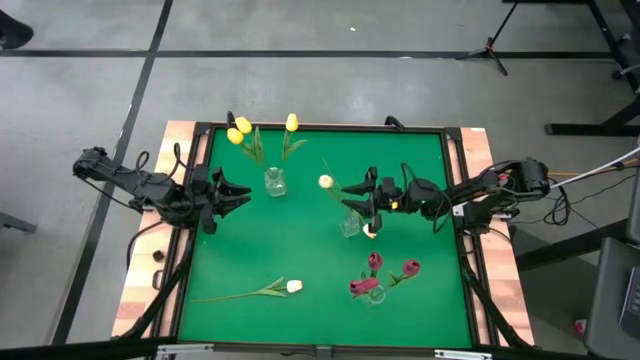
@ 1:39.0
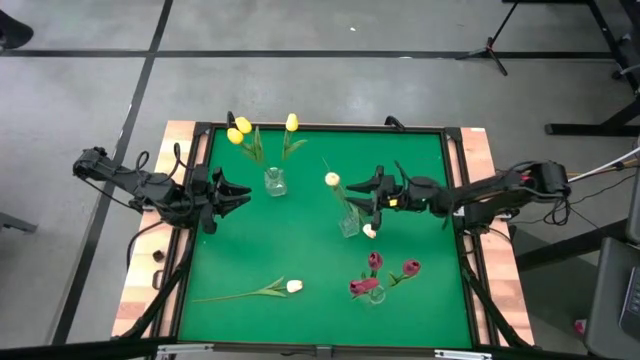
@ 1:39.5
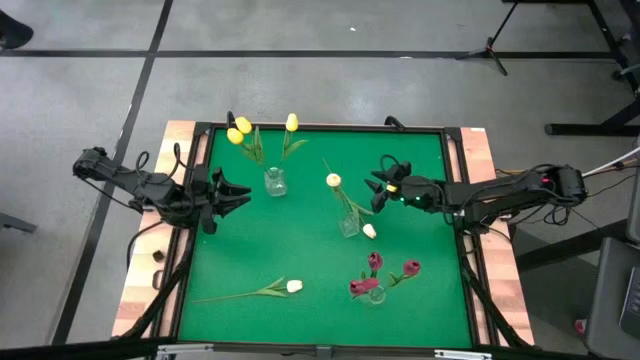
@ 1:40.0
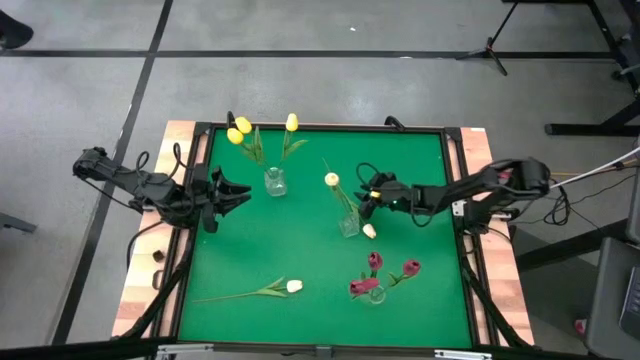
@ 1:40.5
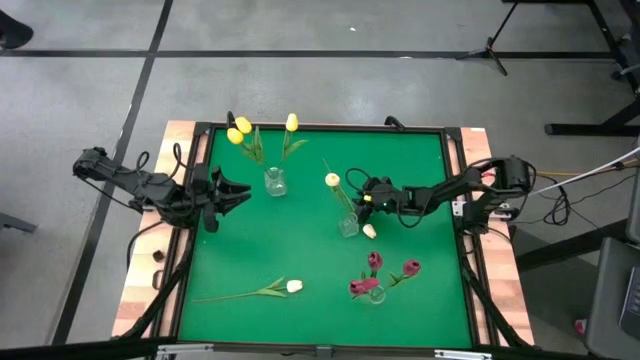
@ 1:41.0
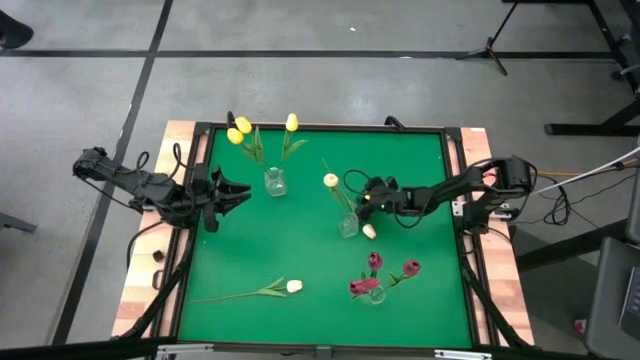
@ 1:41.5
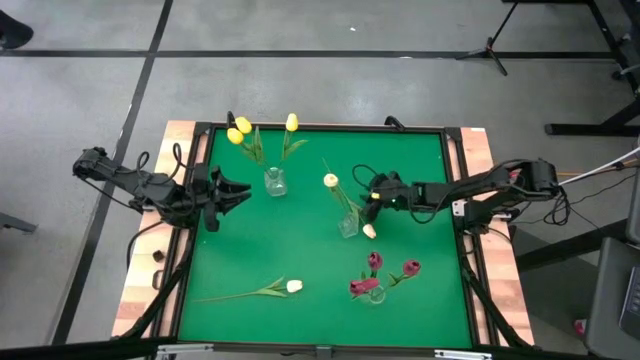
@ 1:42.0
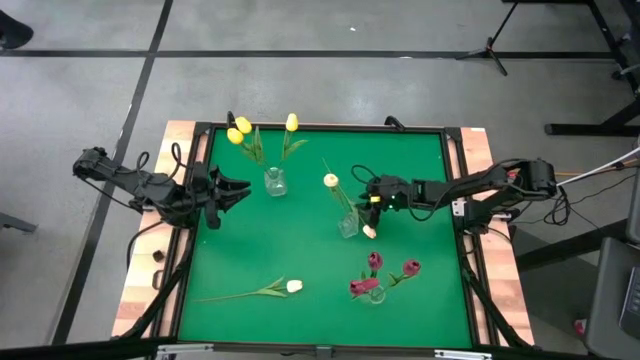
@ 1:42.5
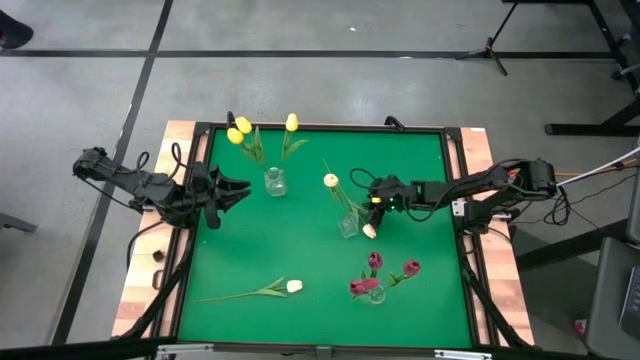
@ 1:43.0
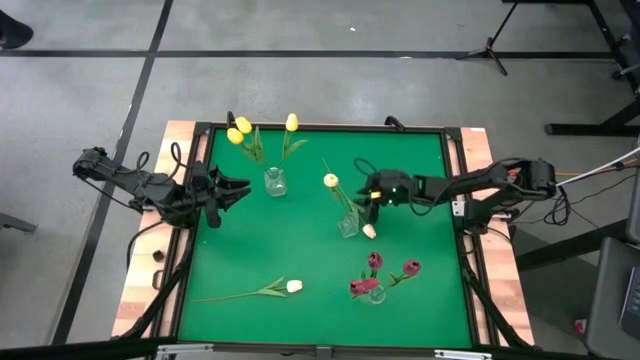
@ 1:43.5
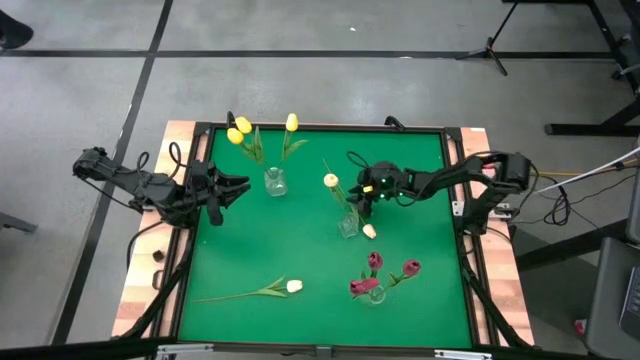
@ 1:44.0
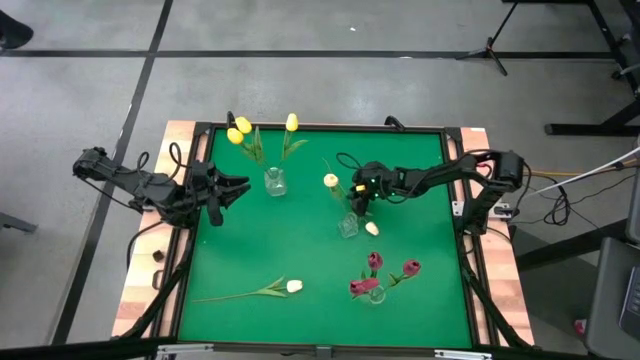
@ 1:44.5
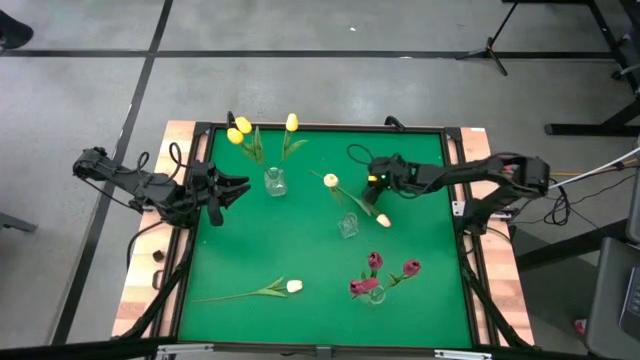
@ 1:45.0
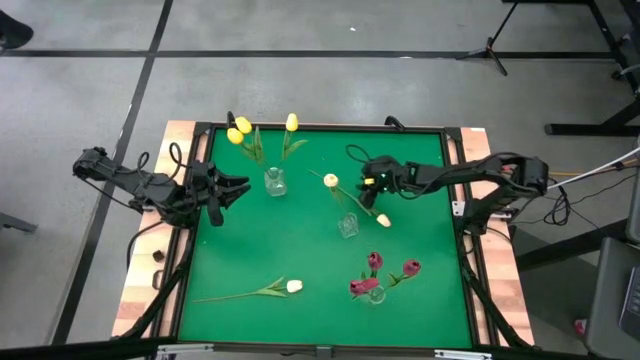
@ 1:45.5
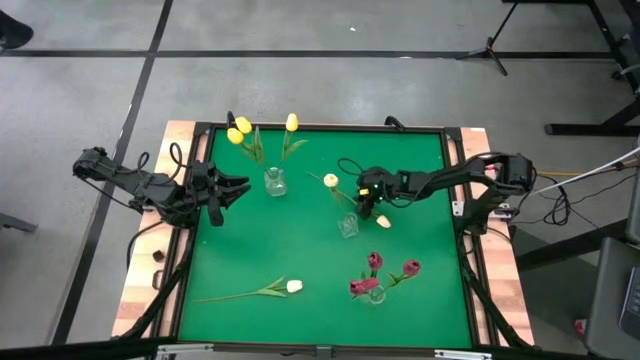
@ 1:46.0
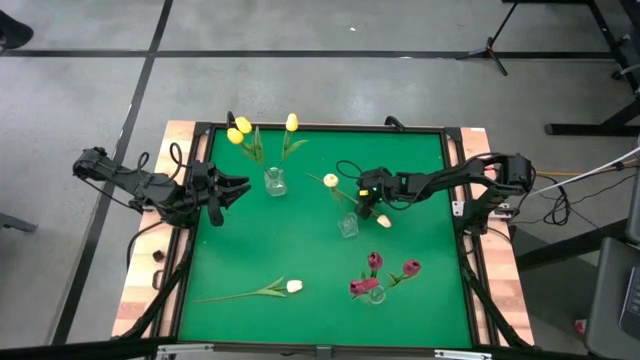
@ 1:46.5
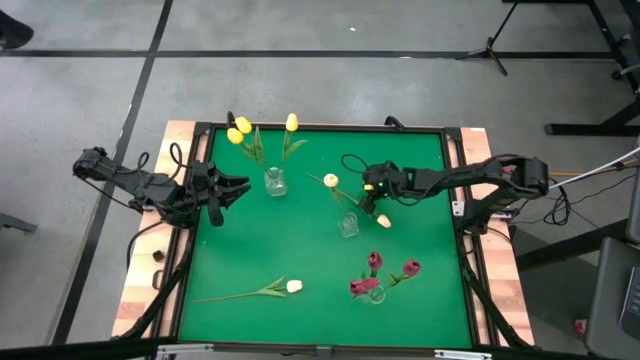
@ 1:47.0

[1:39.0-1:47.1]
Task: Sort flowers into vase by color
Put the top white tulip into the center transparent vase

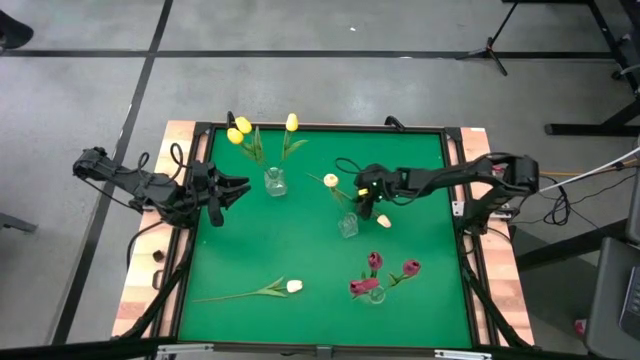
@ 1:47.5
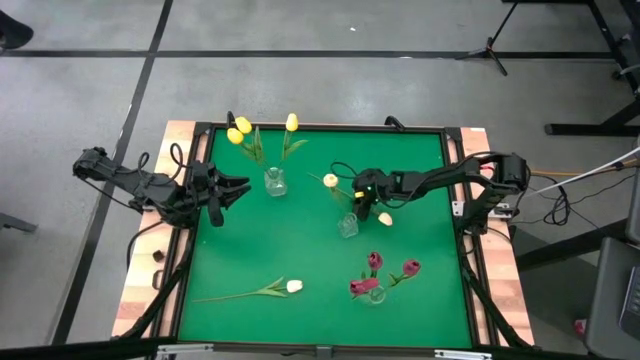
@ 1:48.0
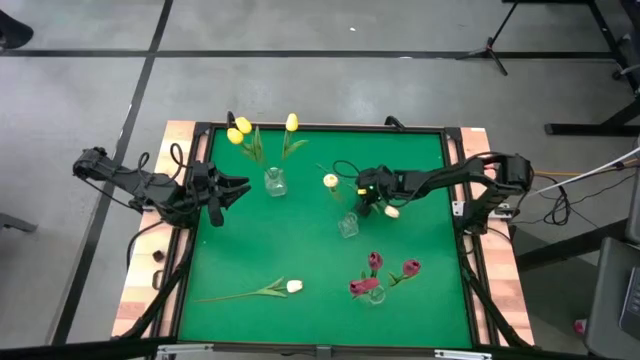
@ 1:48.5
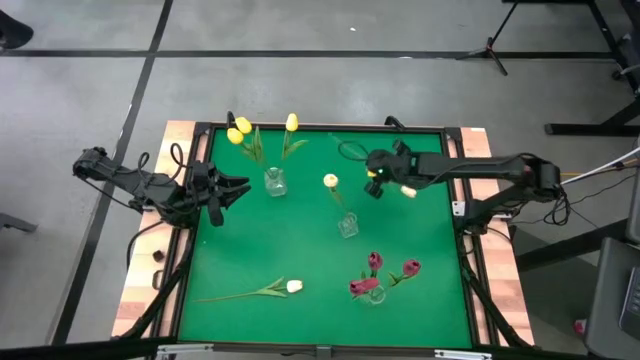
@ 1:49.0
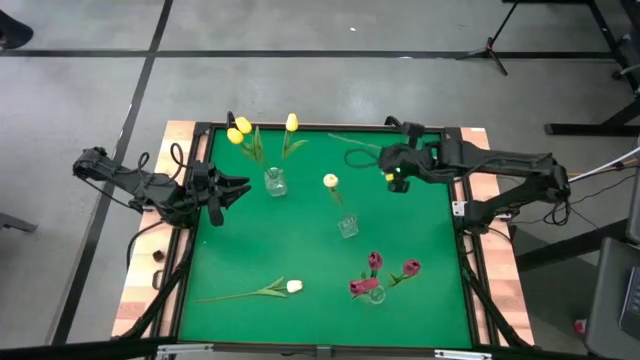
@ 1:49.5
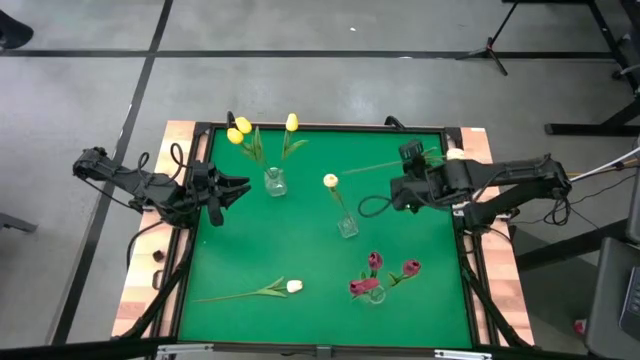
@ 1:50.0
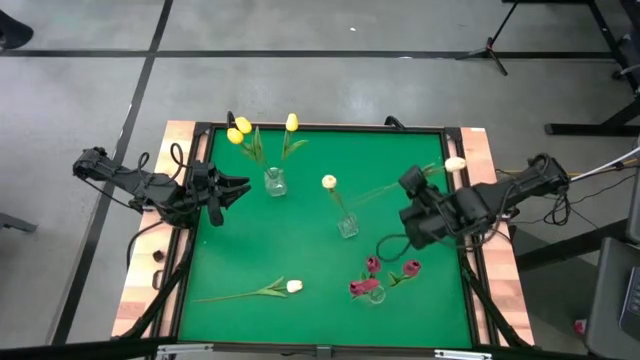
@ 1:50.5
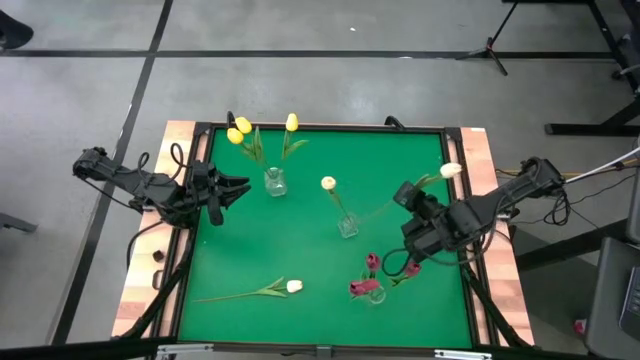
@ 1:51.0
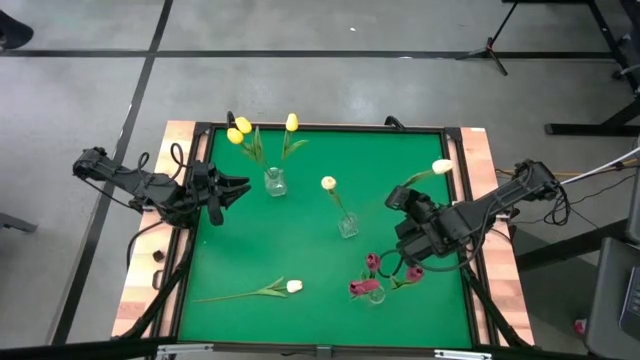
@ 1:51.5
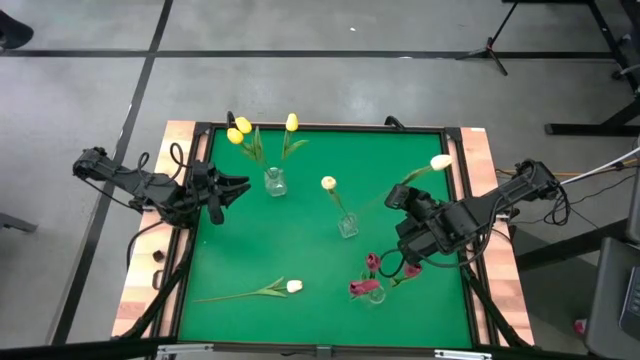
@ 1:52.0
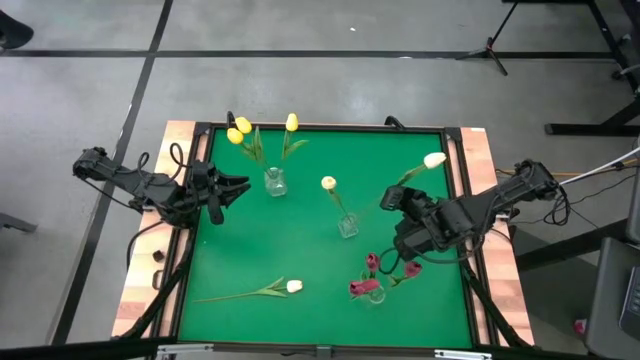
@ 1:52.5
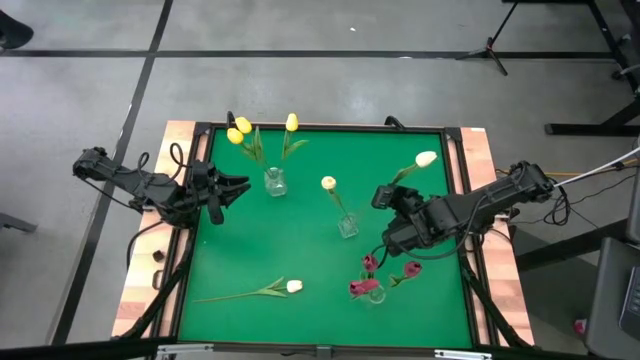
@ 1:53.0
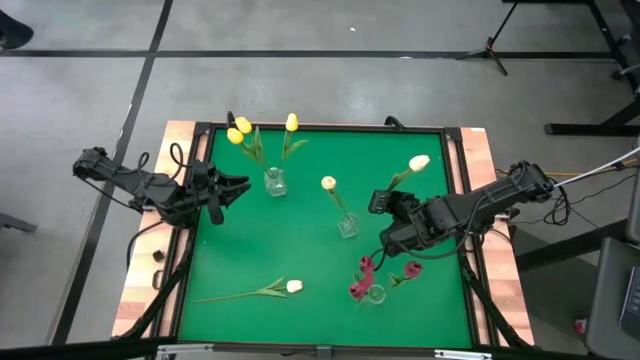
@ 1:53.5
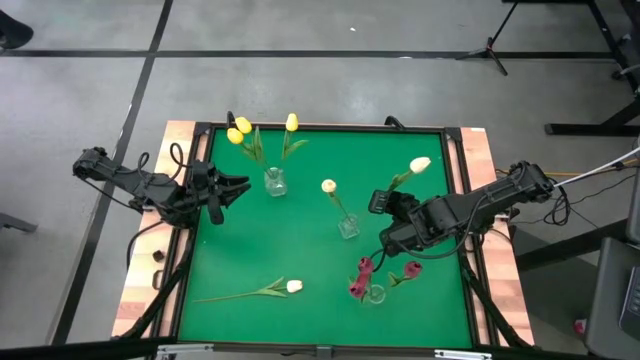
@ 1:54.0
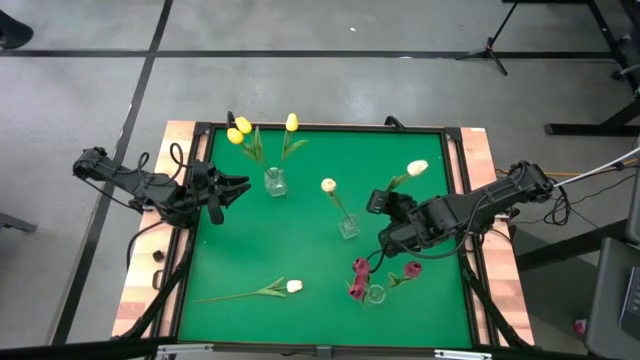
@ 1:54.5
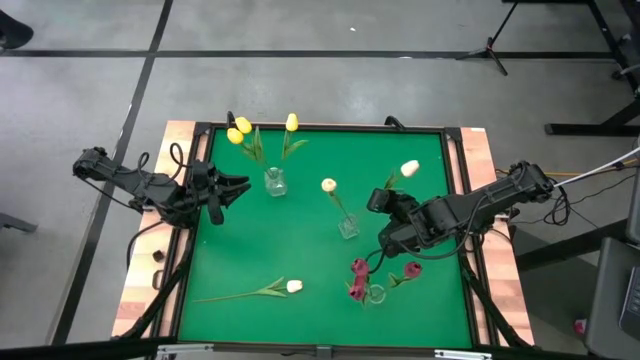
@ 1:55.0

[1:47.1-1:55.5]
Put the top white tulip into the center transparent vase

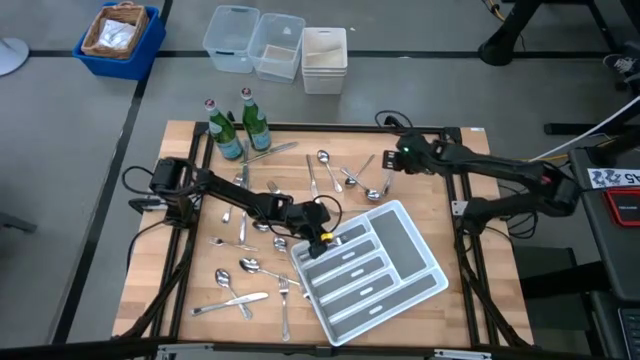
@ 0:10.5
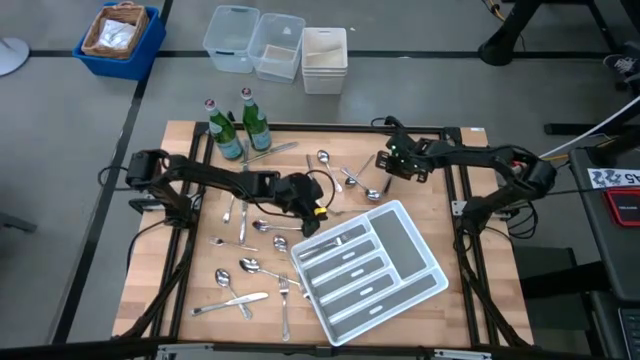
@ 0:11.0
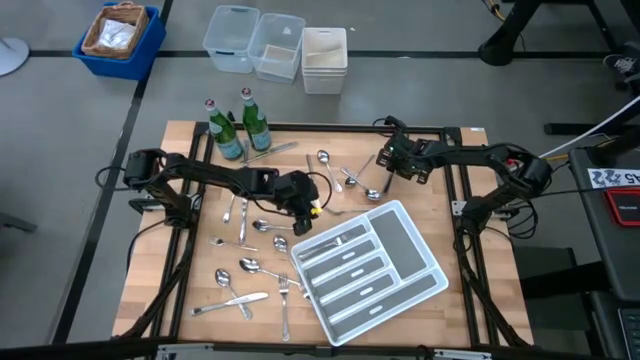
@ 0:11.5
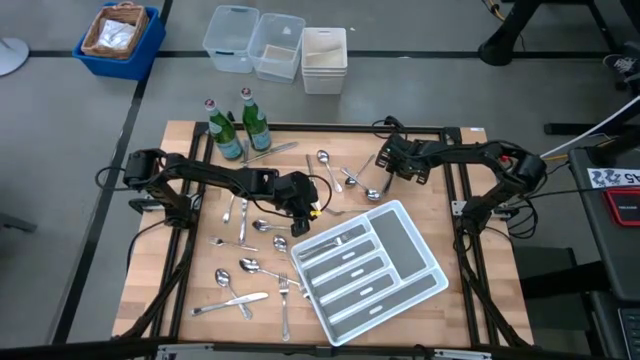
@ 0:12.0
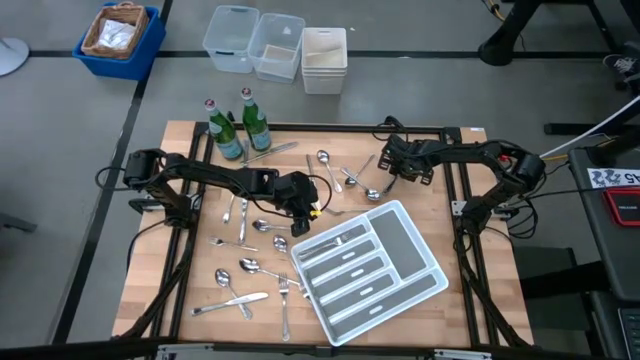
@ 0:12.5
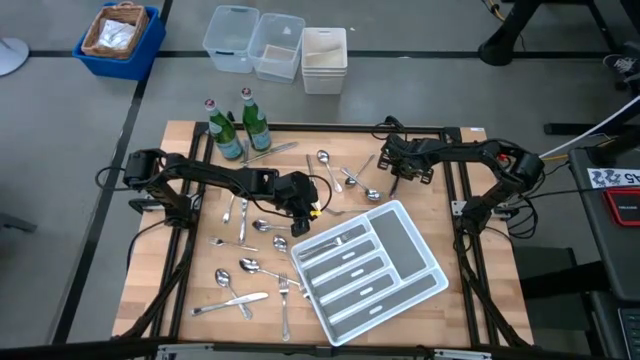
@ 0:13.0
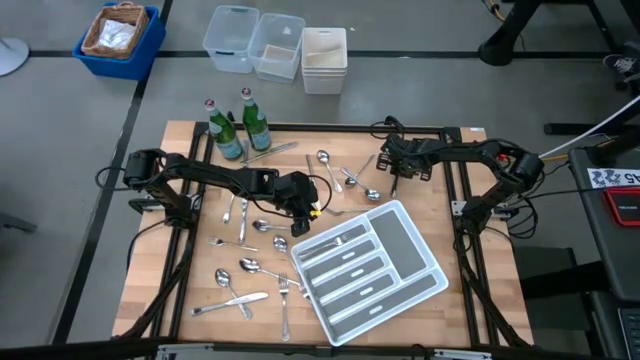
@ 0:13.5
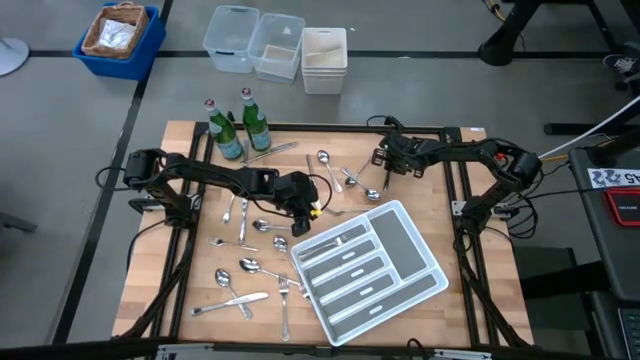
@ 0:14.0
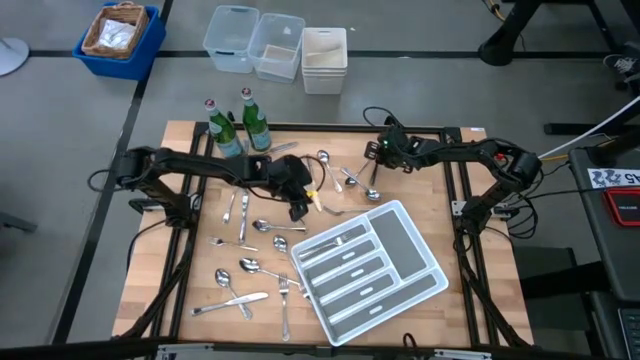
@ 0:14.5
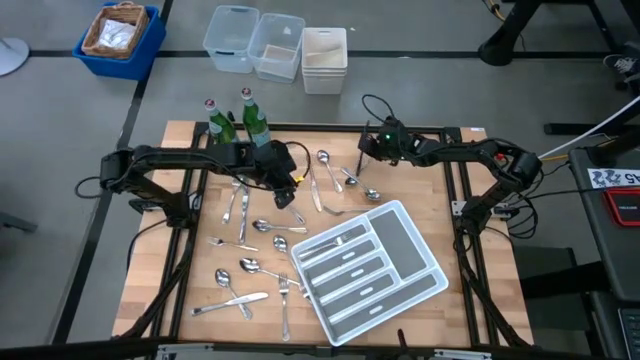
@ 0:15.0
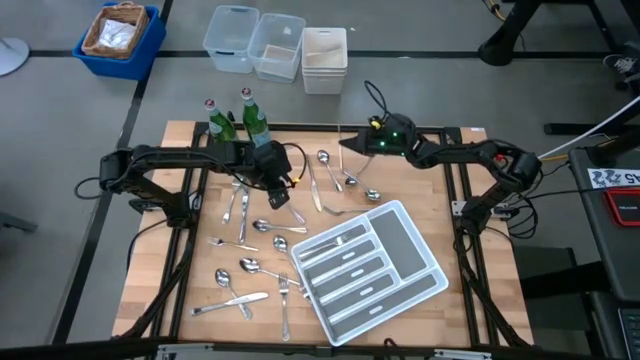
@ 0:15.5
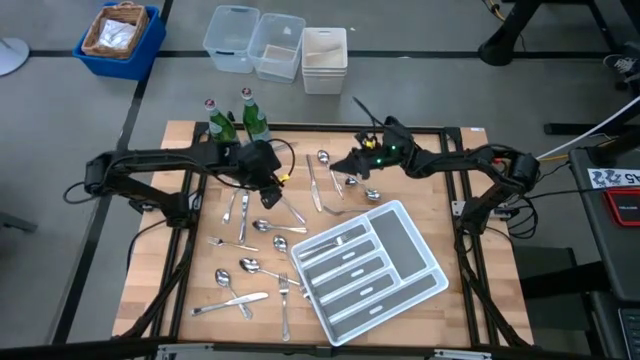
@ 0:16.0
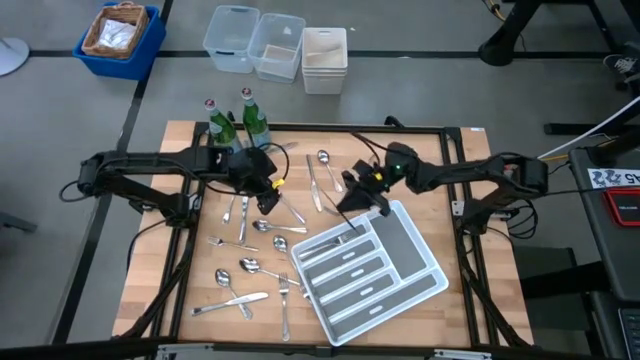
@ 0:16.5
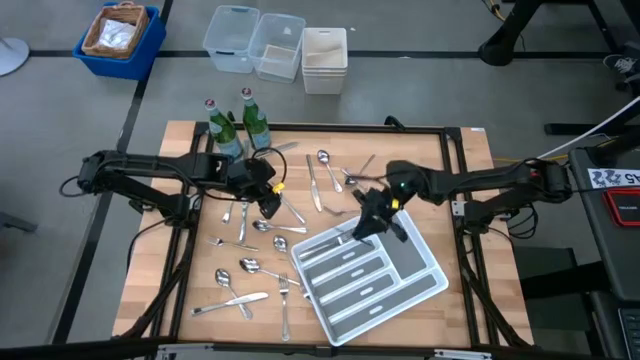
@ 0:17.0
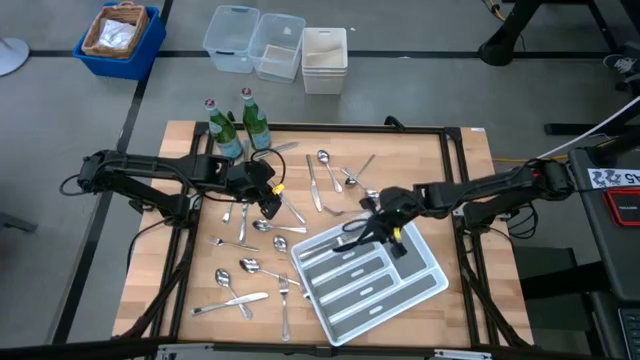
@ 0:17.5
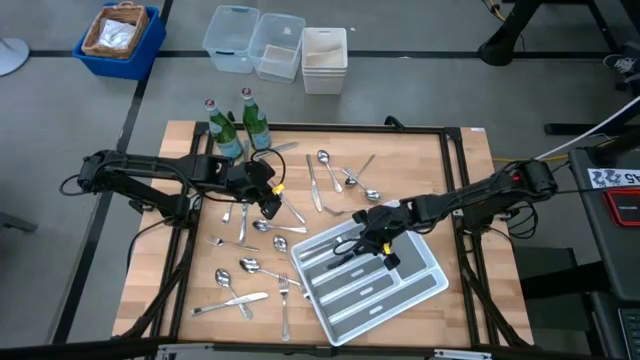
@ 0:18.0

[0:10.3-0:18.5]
Task: Sort silverware
Put the silver table knife into the white silverware tray
